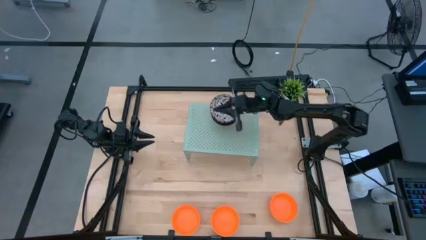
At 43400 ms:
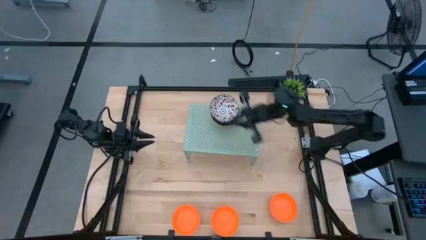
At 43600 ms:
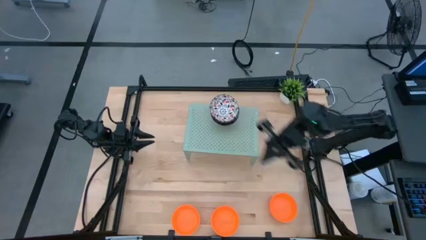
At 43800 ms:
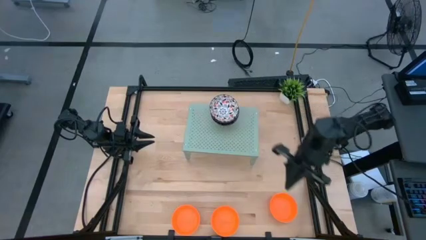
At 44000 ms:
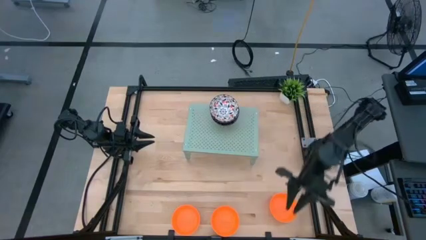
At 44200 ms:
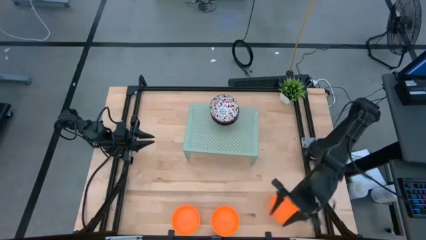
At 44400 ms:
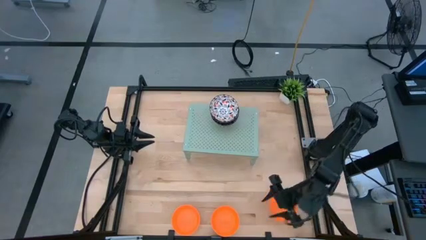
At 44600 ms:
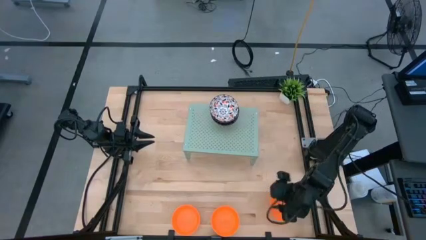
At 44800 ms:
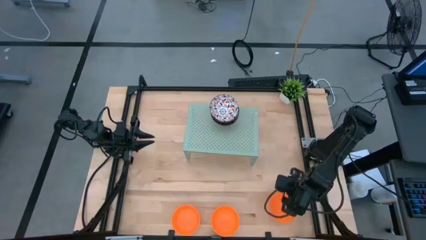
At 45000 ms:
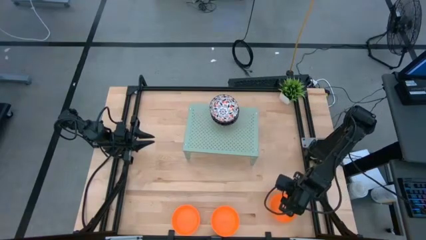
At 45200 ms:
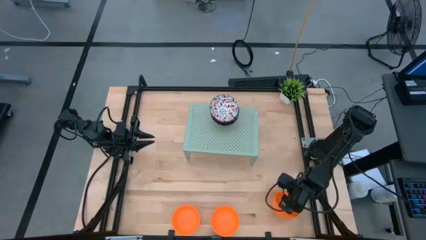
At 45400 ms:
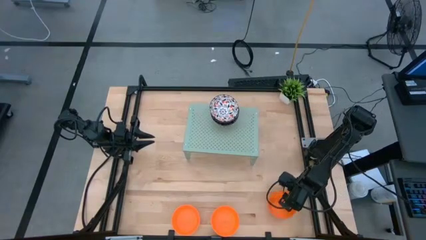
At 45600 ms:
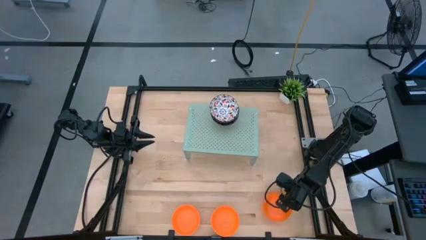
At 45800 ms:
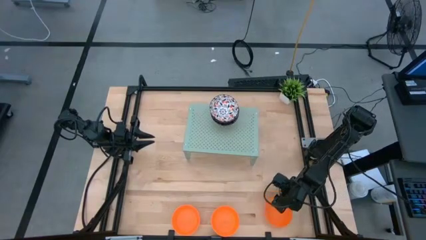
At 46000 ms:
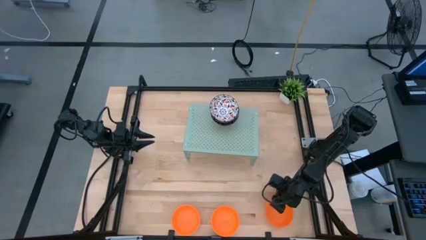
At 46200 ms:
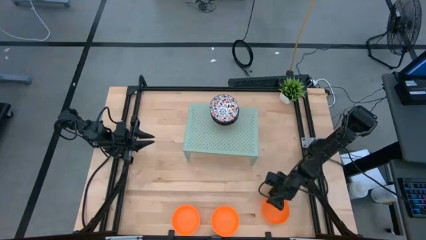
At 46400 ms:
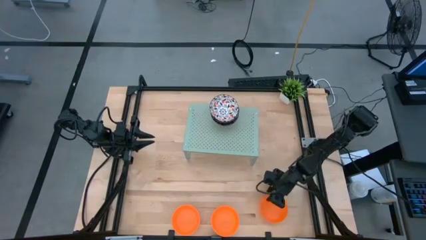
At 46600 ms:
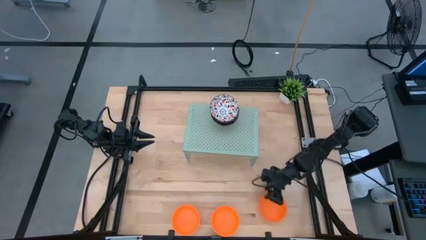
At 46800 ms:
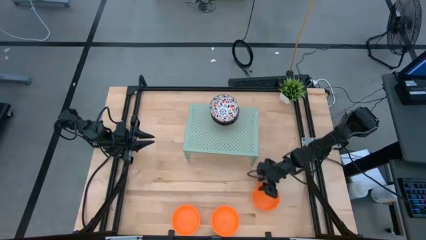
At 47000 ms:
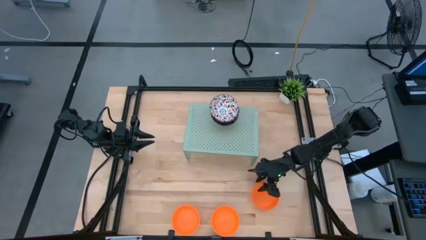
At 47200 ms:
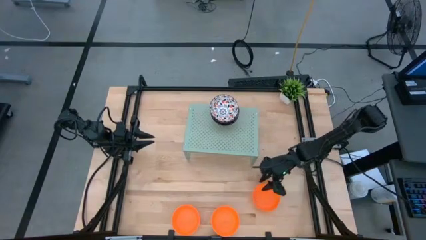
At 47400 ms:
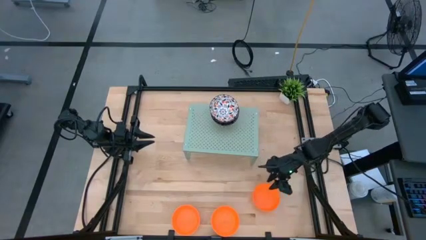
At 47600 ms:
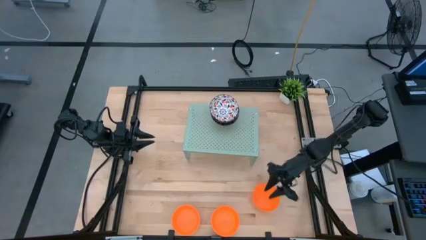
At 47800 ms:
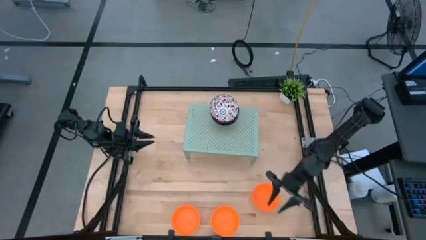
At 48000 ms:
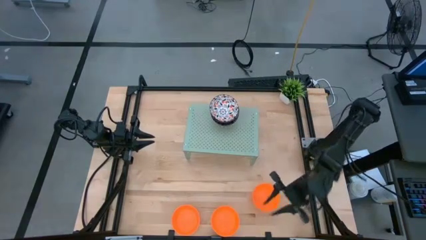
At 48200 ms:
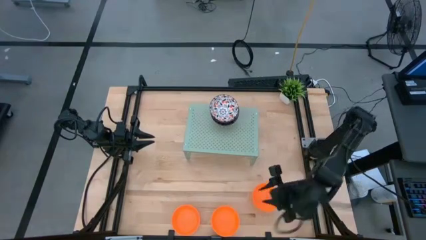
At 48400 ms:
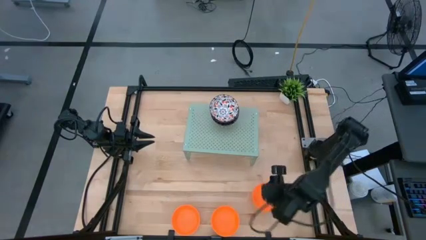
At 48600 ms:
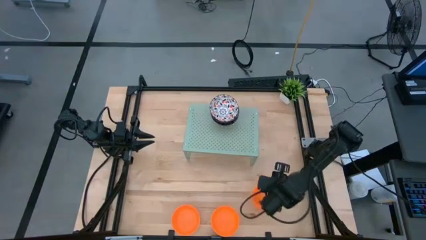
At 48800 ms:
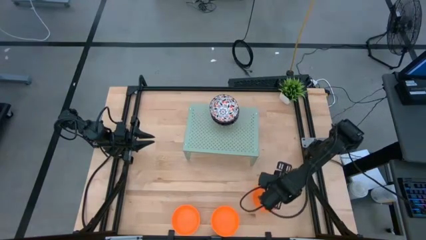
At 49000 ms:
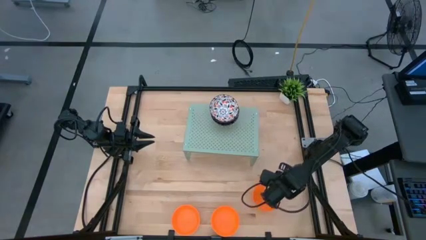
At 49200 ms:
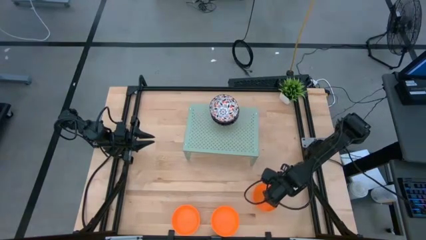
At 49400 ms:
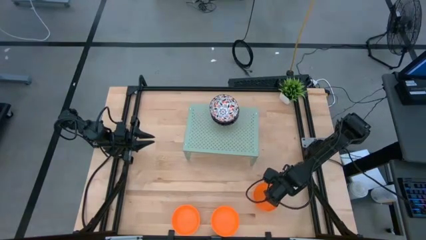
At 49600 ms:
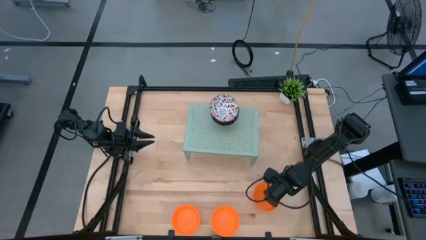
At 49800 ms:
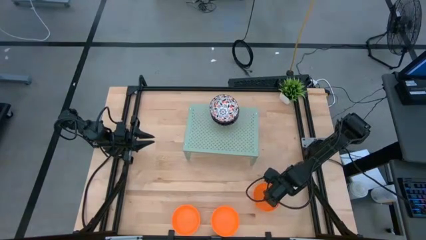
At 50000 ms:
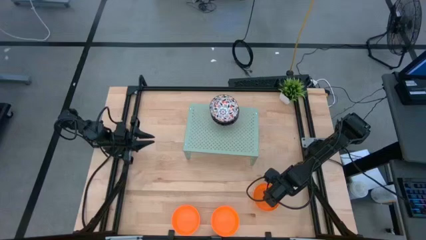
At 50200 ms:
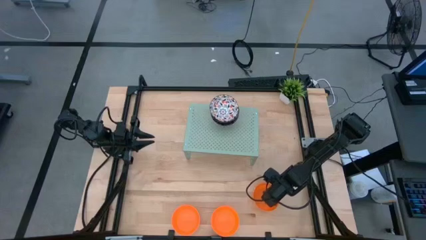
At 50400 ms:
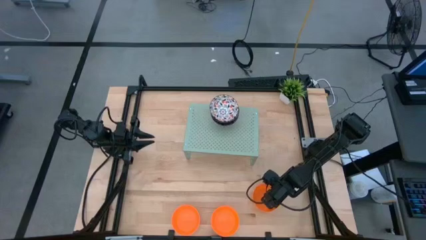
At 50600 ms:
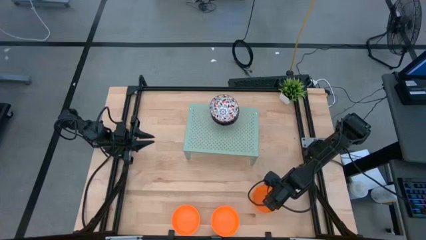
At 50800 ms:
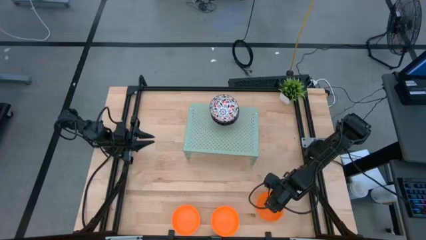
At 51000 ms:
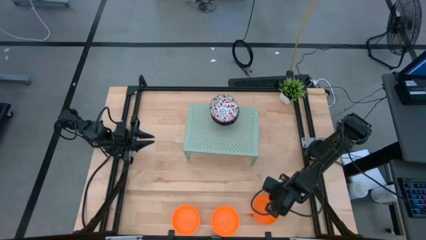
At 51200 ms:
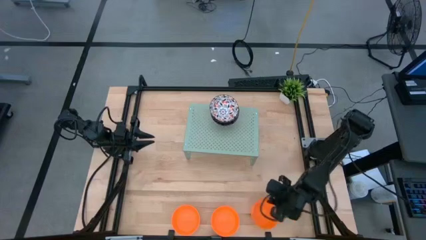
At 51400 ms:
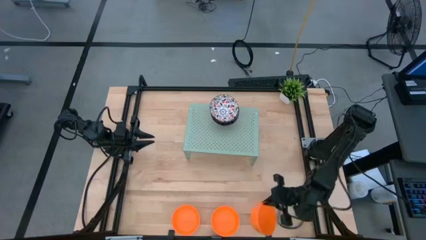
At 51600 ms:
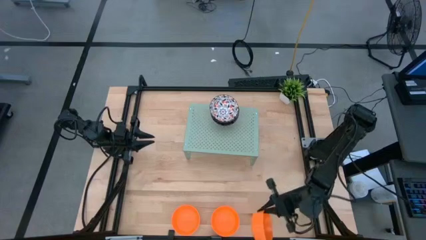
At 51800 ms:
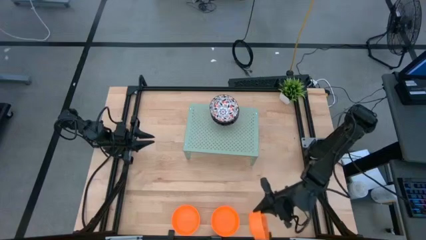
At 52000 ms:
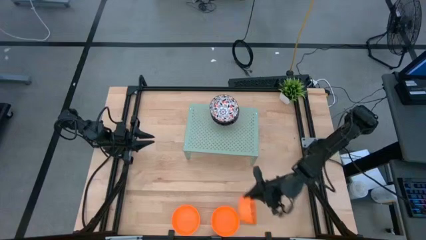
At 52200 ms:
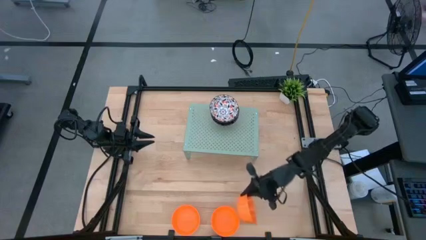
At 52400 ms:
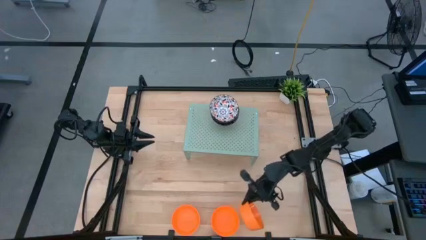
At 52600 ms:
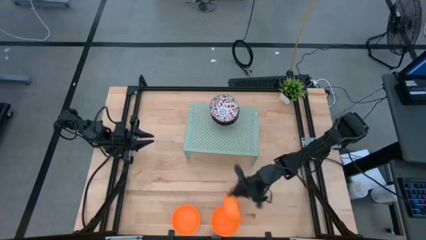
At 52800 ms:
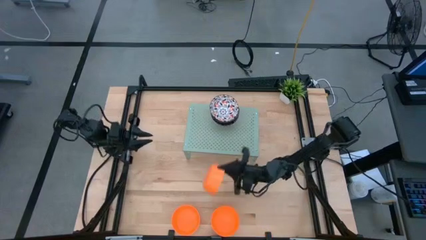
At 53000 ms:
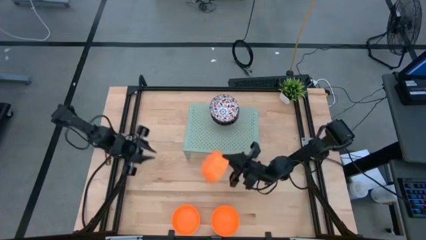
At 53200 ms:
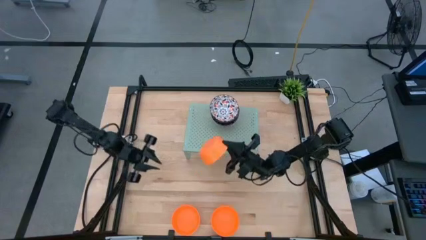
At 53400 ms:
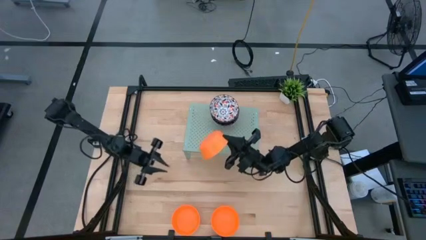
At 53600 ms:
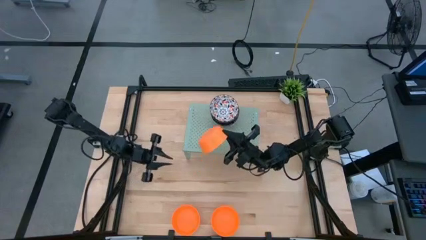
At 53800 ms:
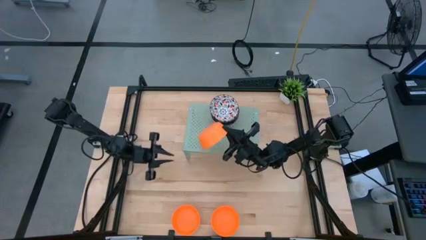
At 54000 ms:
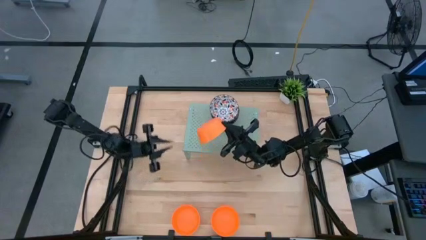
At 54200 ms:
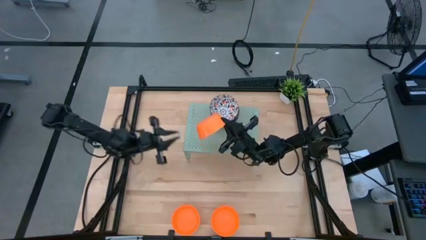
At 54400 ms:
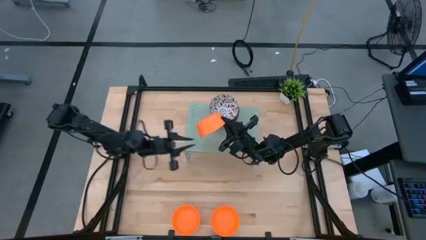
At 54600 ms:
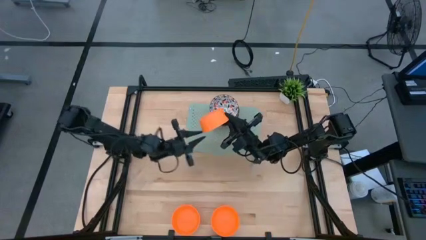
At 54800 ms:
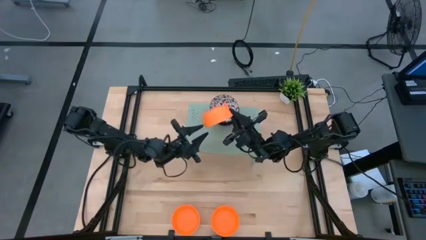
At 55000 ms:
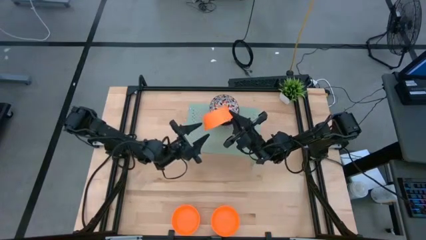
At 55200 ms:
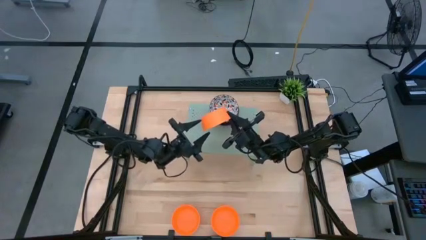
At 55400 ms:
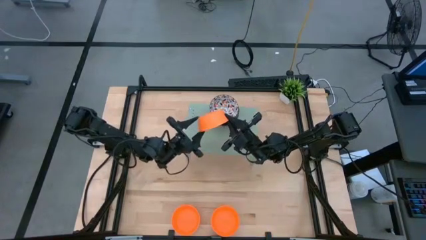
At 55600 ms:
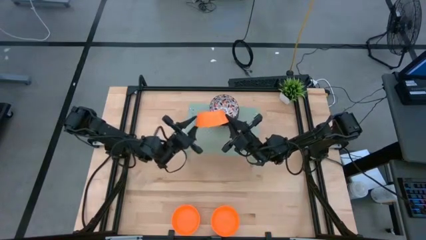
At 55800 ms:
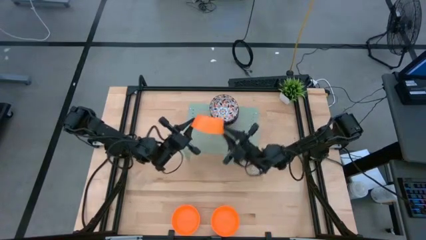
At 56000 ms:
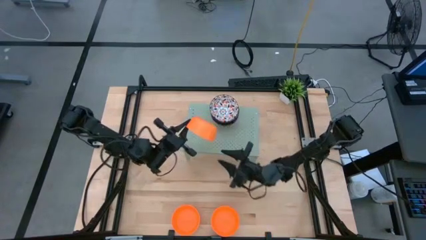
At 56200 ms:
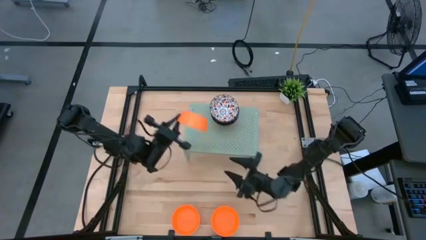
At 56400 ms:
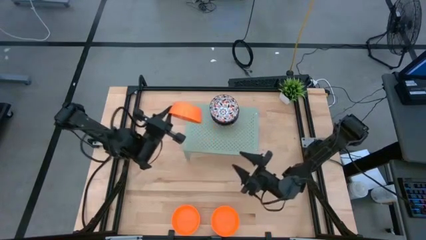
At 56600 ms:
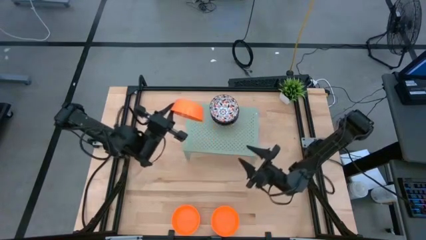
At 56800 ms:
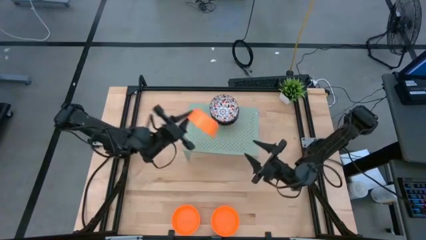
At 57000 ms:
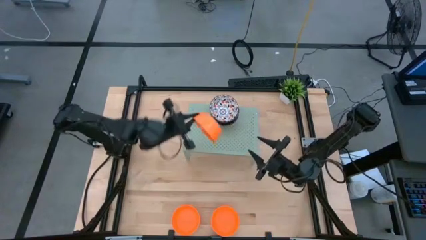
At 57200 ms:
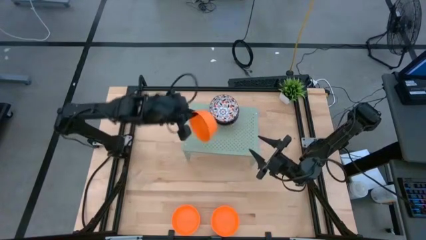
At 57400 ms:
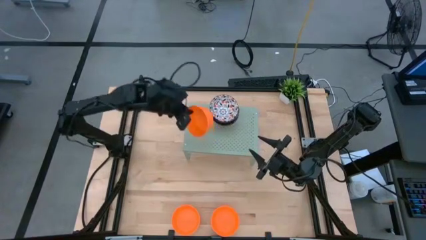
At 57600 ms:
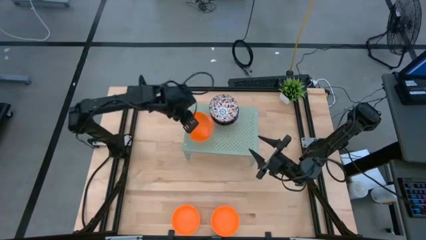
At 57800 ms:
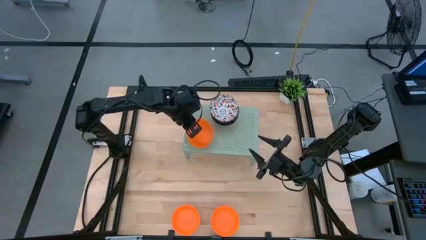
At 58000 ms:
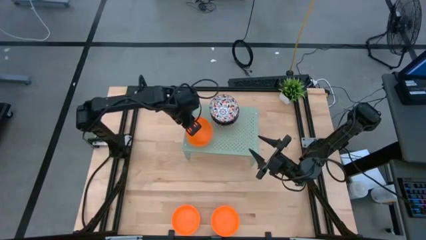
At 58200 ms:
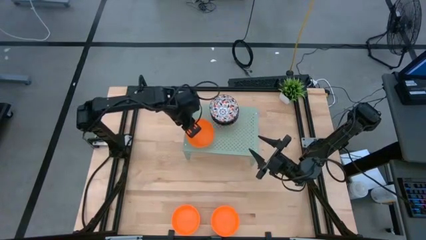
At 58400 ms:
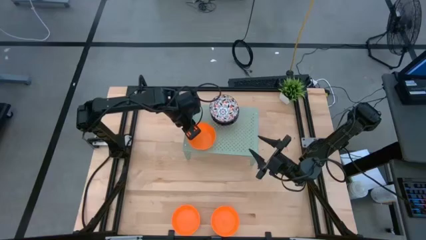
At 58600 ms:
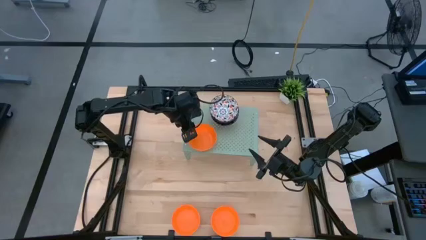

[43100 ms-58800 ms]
Task: Pick & Place Mini bowls
Put the right orange bowl on the shelf
